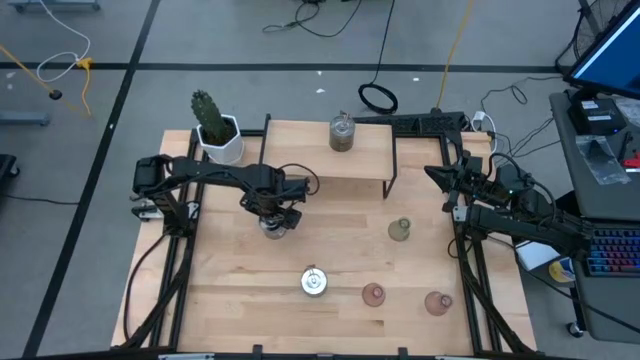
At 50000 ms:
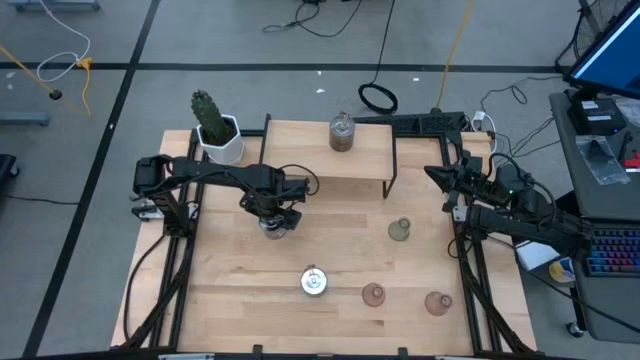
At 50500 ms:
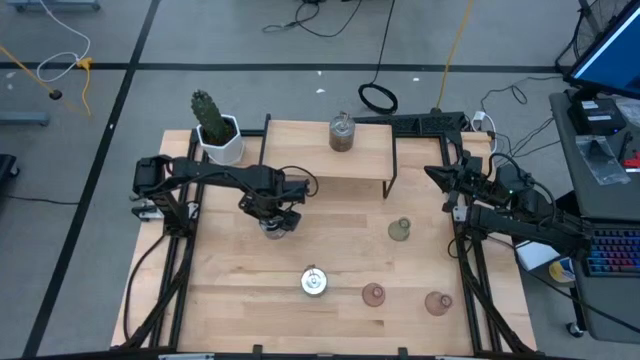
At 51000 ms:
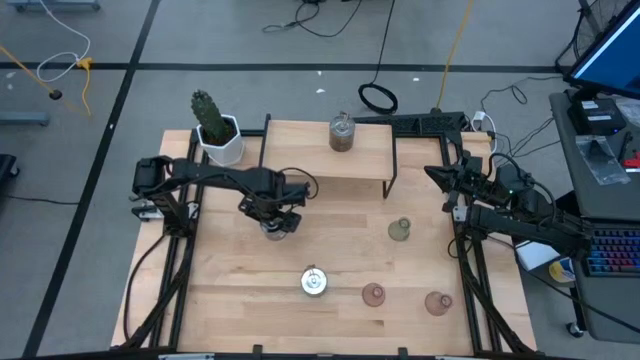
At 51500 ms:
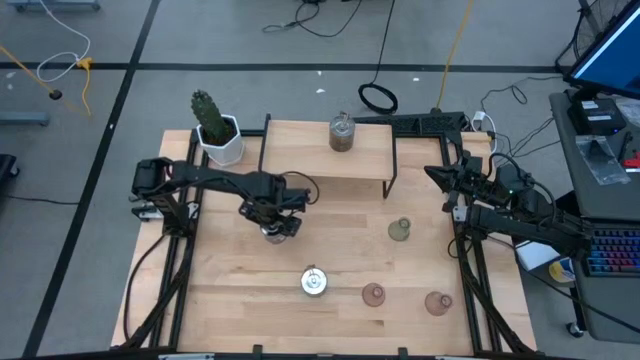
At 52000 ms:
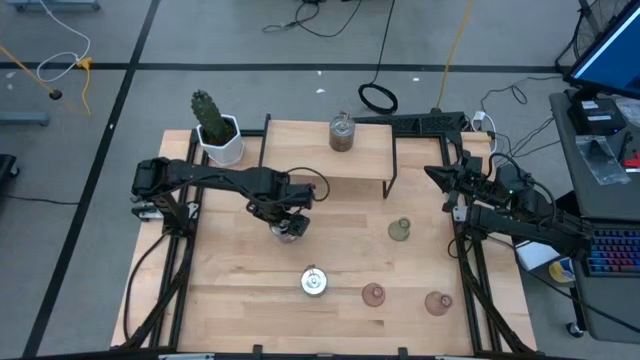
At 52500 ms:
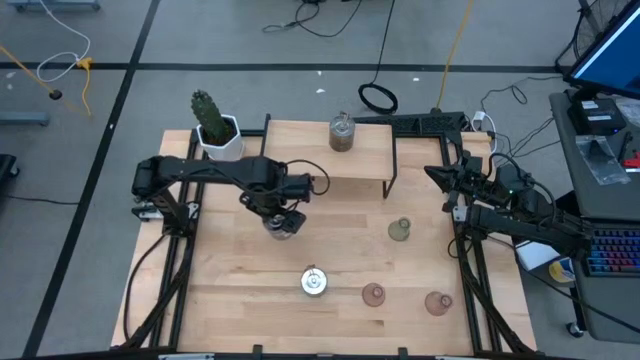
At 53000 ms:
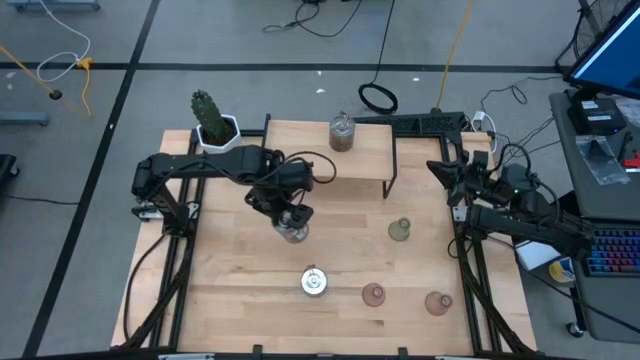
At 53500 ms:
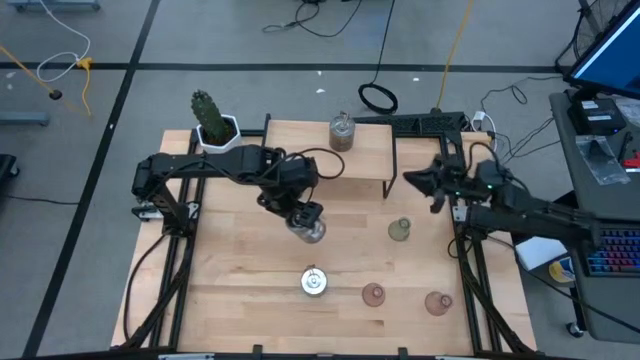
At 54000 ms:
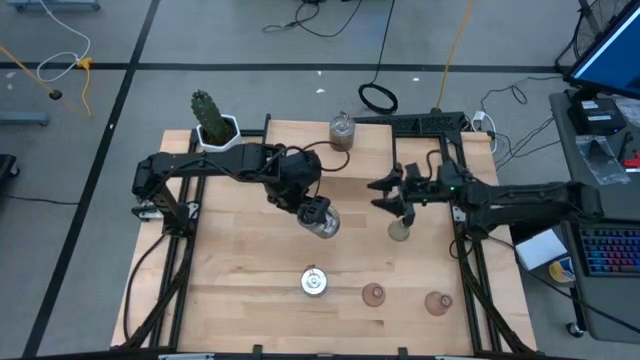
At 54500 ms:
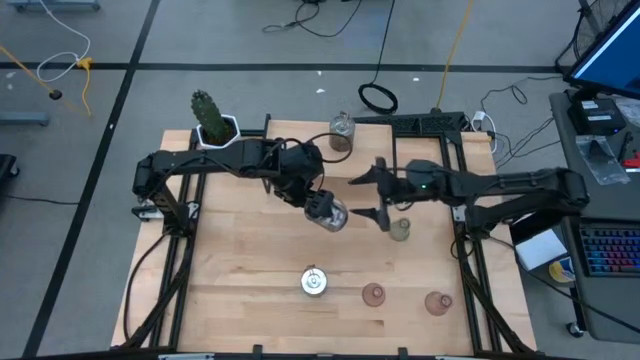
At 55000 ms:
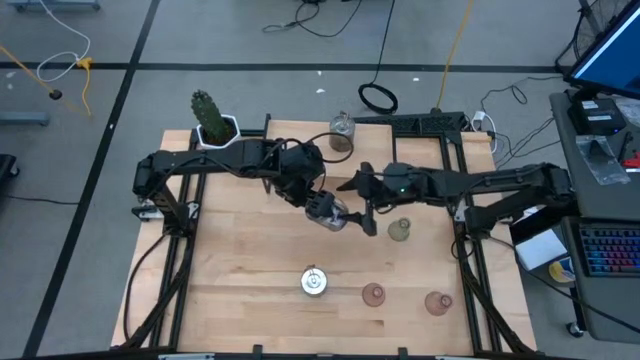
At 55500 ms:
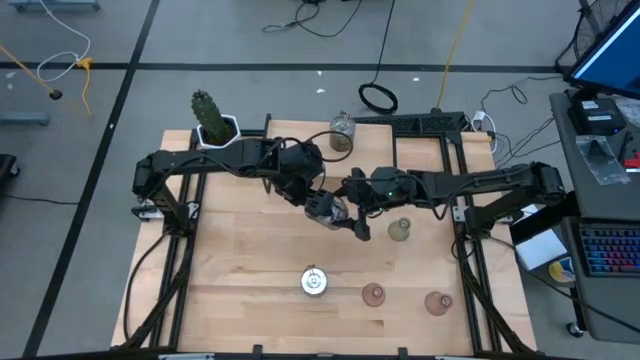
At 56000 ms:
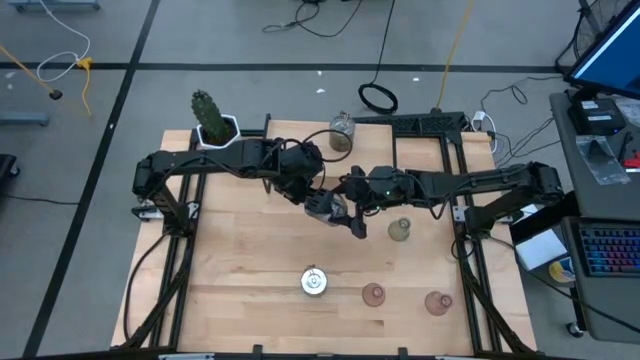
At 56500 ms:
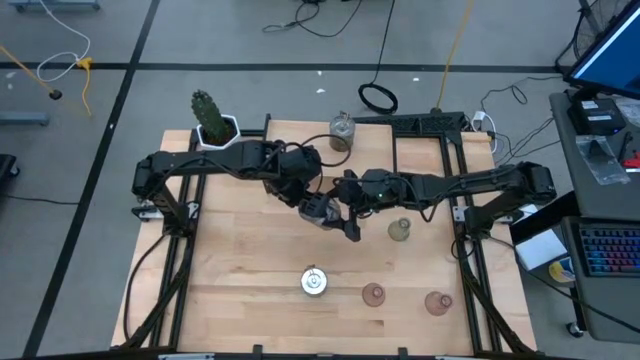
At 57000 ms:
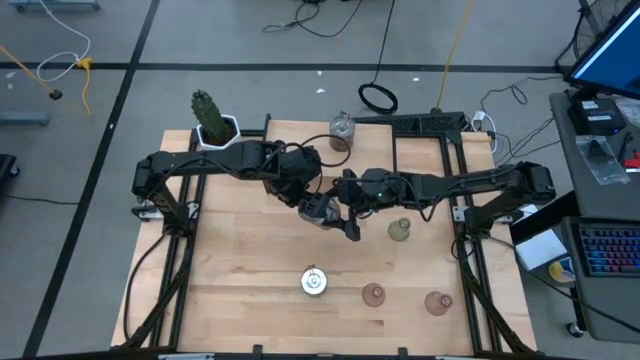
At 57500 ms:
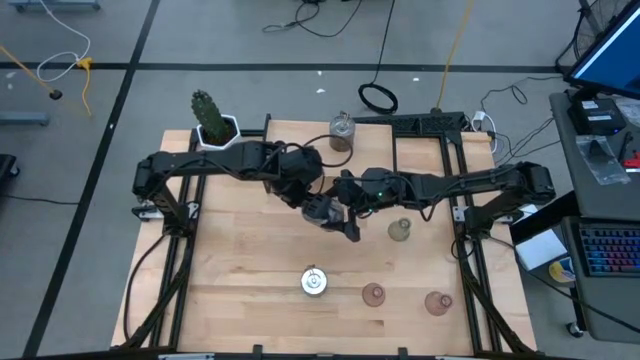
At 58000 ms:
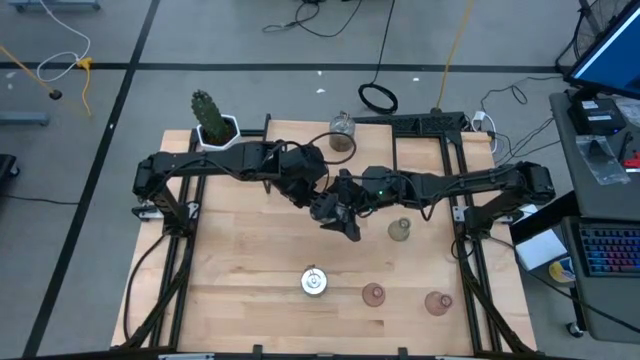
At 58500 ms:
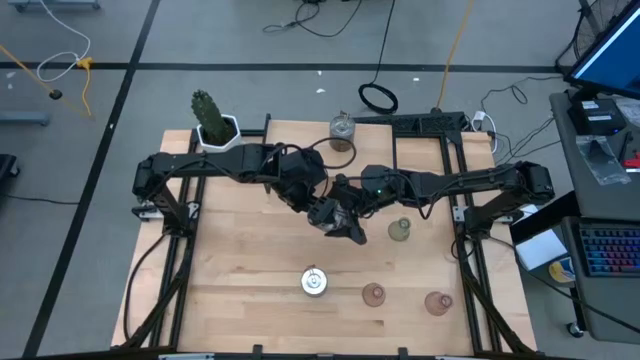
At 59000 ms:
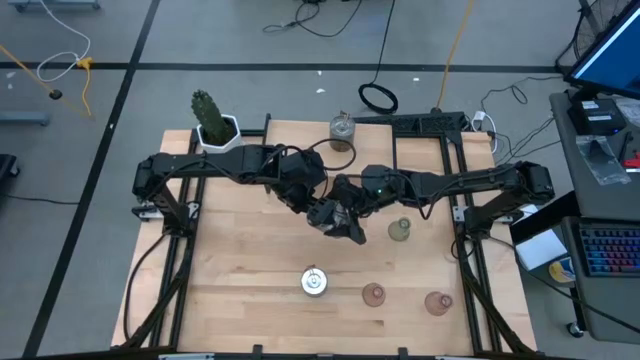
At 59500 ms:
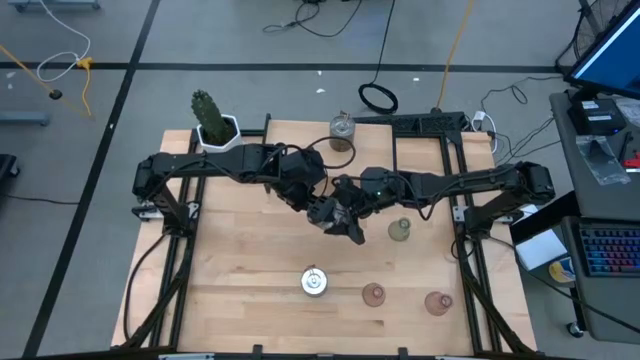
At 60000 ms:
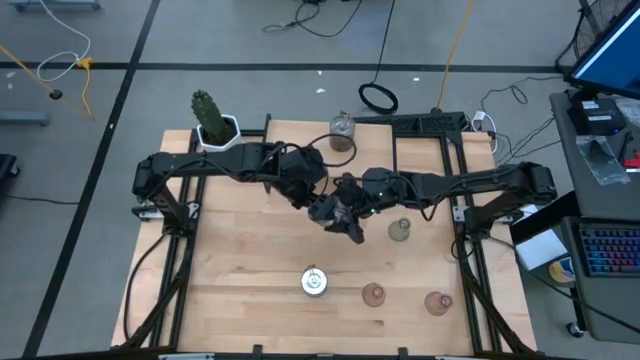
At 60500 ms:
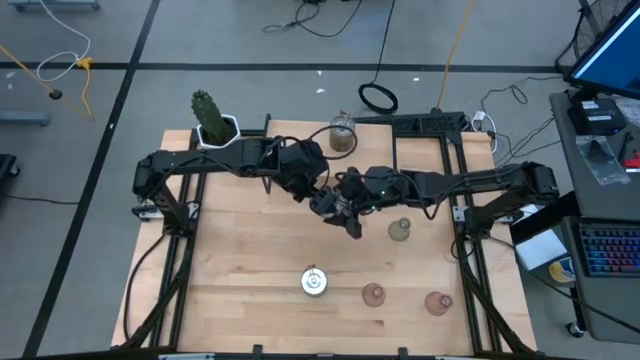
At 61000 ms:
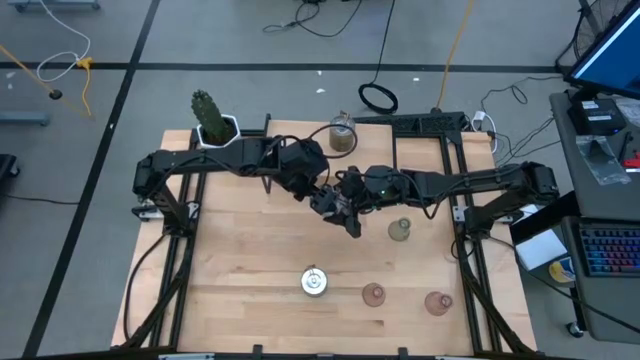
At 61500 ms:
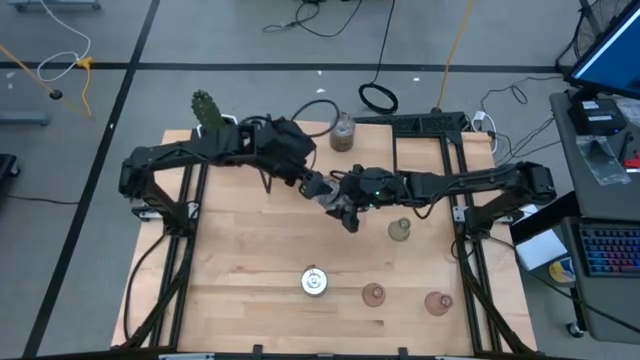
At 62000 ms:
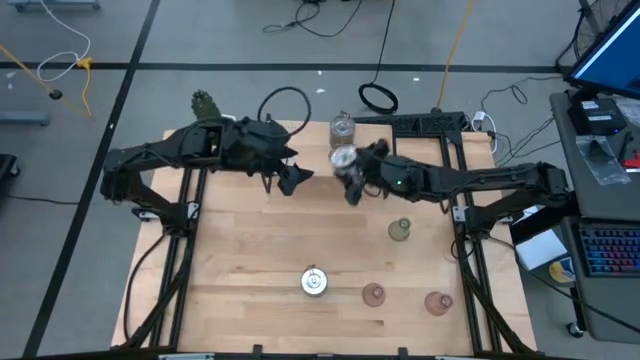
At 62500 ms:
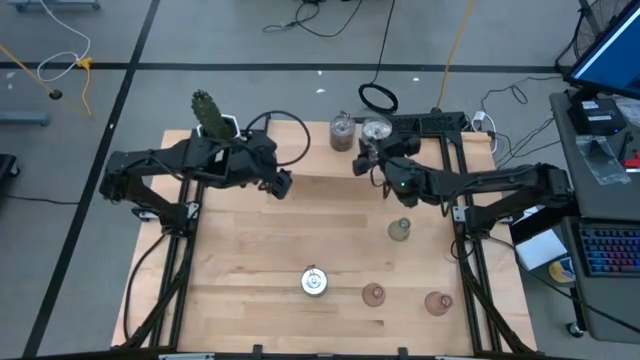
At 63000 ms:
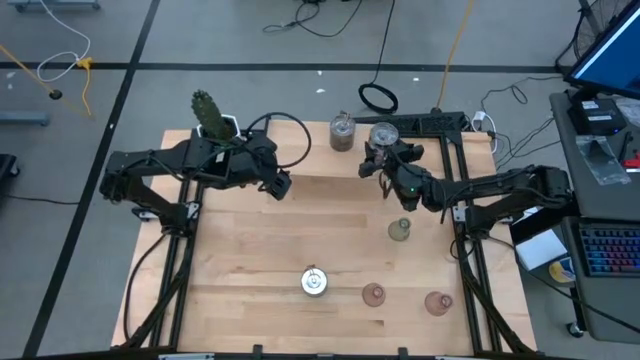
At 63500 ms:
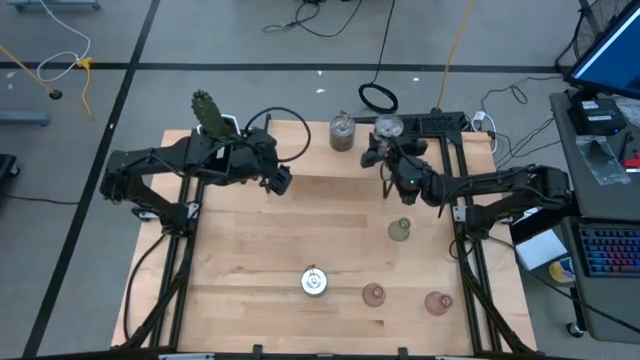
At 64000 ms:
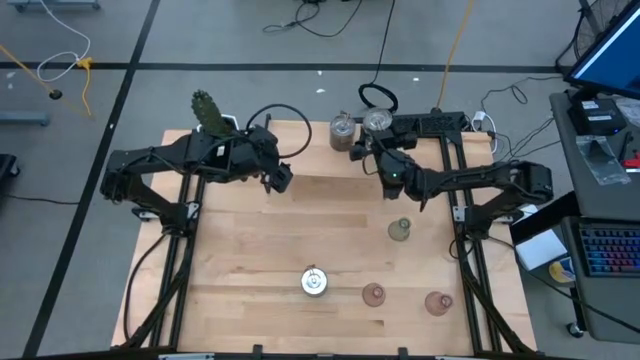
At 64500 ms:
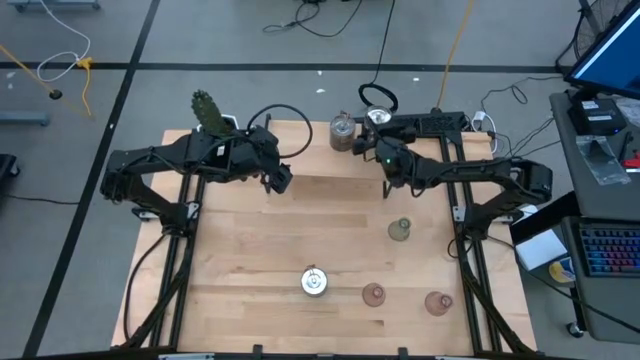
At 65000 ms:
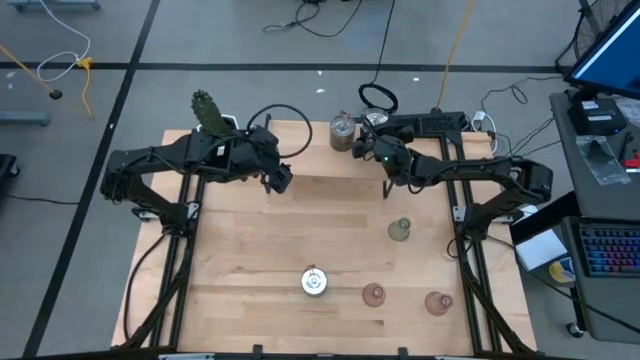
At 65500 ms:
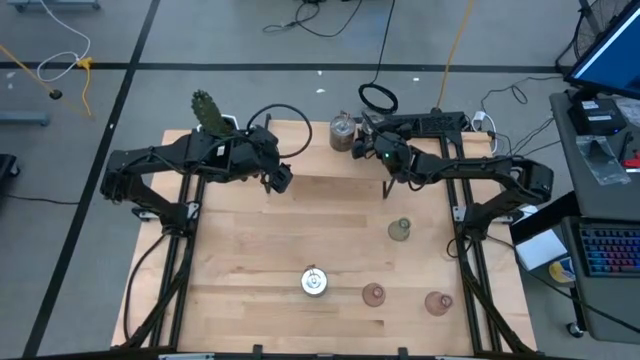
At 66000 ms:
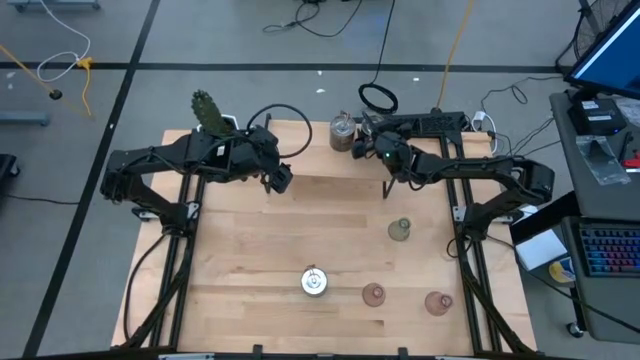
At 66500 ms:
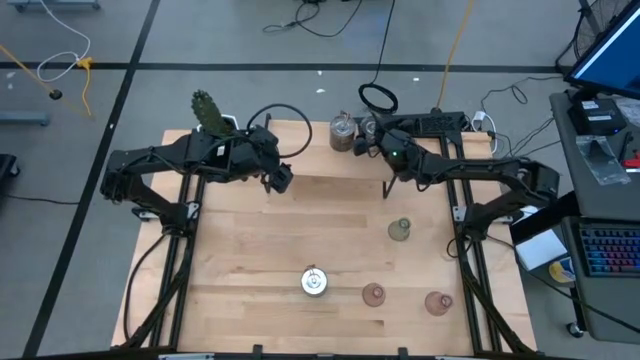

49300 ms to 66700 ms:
Task: Pick & Place candle stick holders
Put the top silver scented candle on the shelf

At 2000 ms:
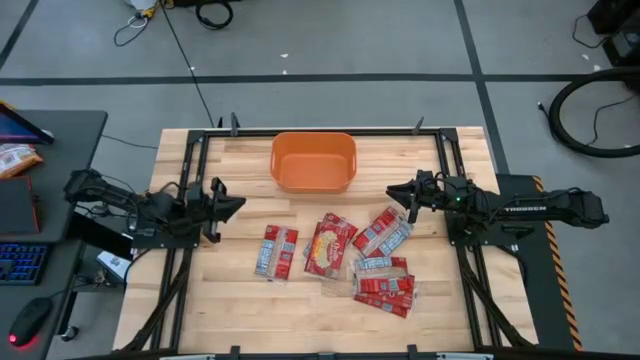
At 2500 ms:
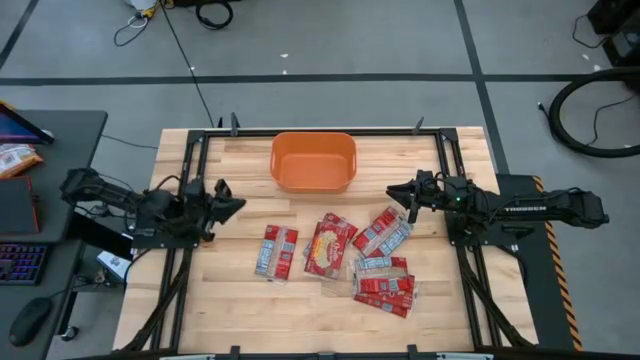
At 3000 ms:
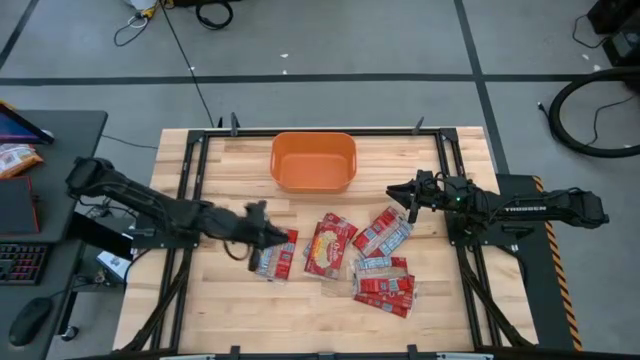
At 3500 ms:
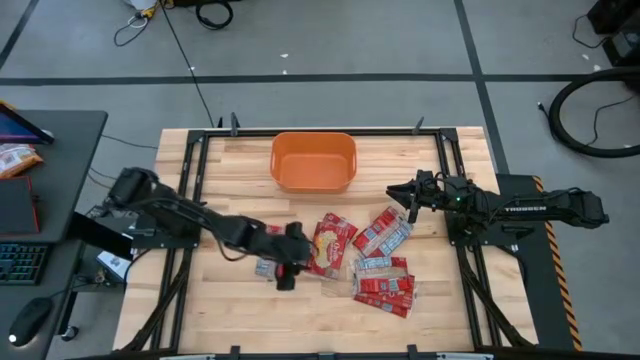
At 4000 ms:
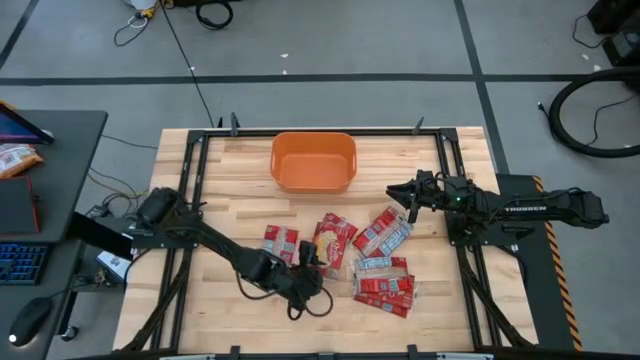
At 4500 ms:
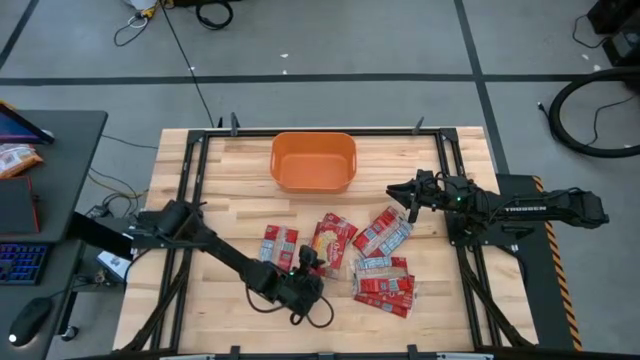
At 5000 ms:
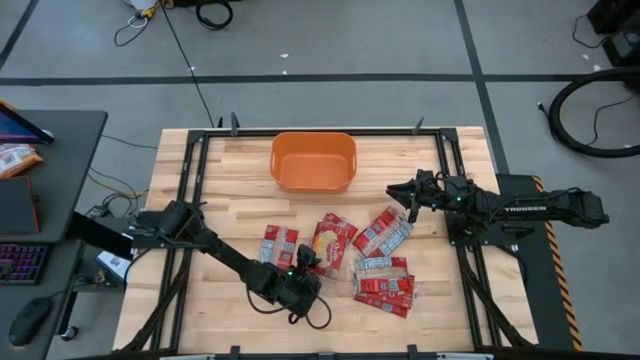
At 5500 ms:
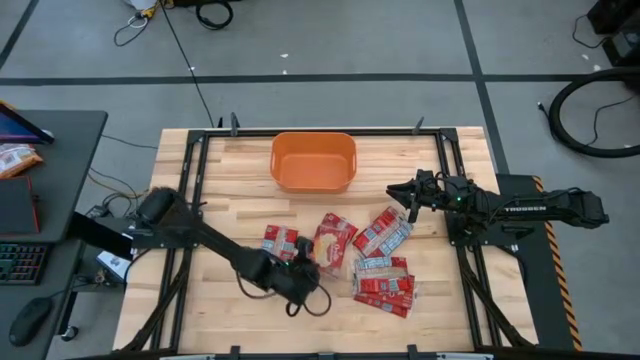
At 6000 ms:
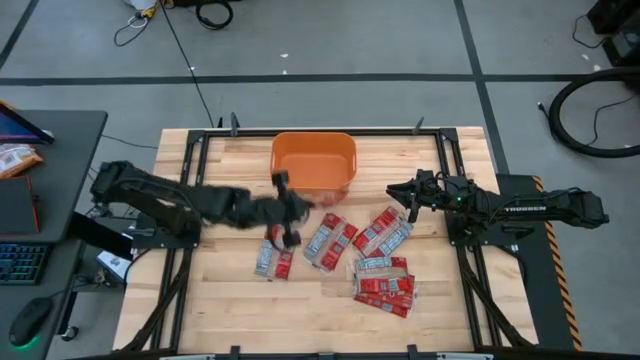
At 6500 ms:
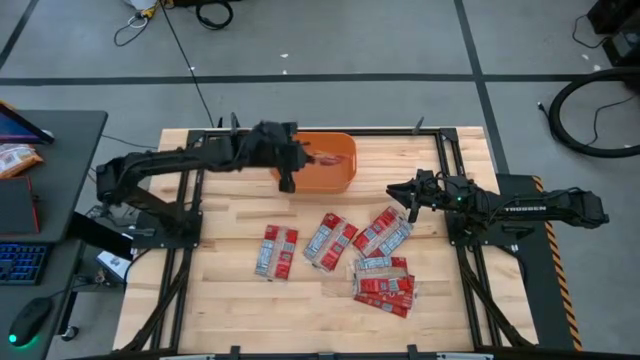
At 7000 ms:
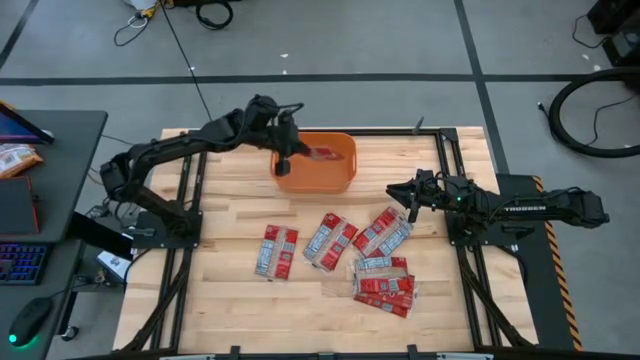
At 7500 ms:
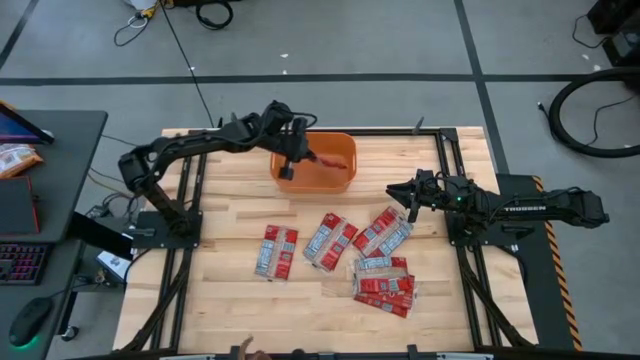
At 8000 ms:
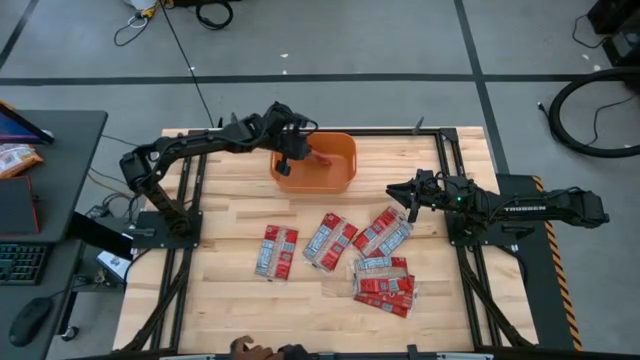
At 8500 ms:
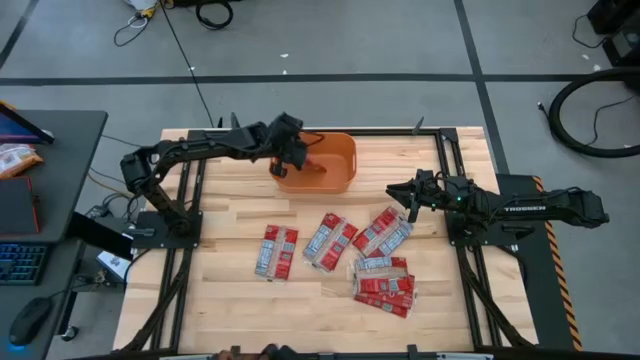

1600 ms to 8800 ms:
Task: Sort popcorn bags into baskets
Put the red popcorn bag into the orange bin
